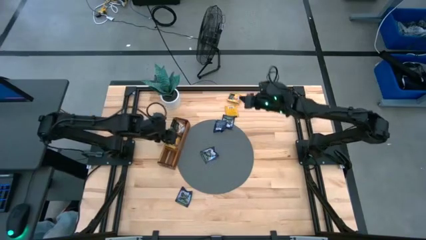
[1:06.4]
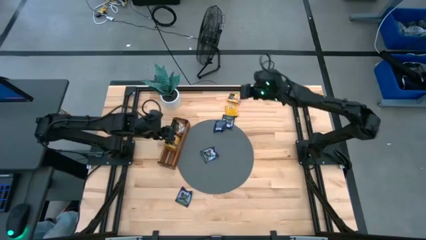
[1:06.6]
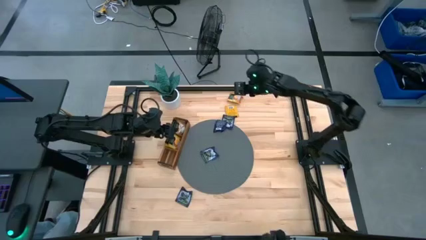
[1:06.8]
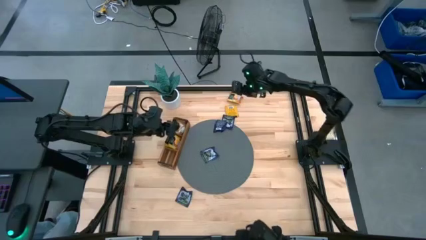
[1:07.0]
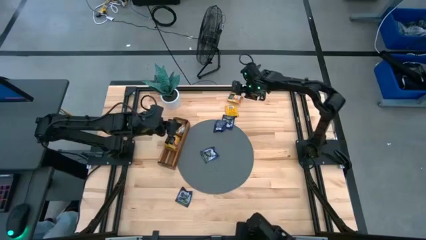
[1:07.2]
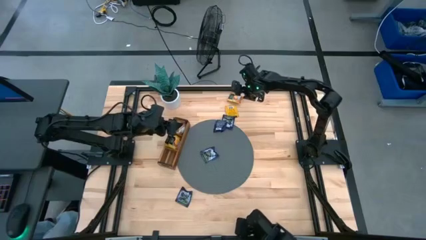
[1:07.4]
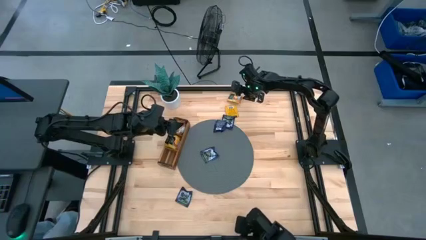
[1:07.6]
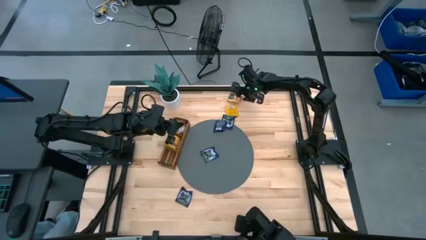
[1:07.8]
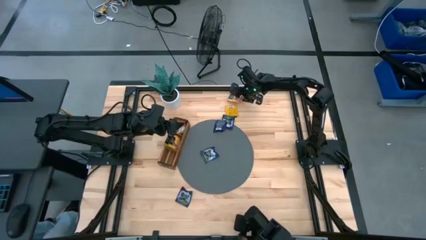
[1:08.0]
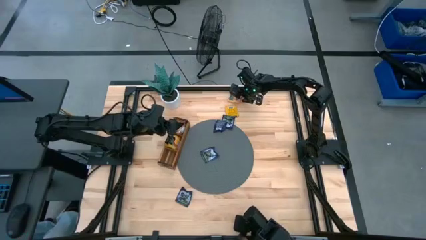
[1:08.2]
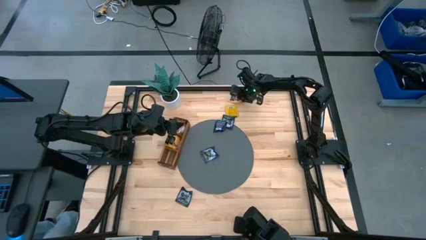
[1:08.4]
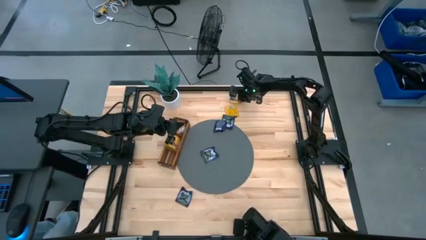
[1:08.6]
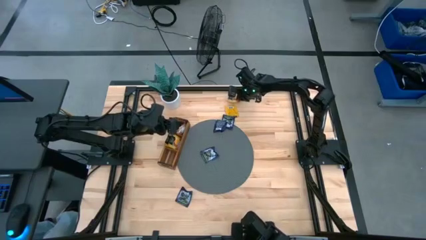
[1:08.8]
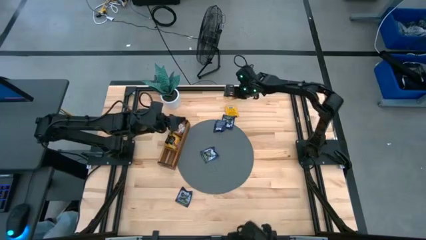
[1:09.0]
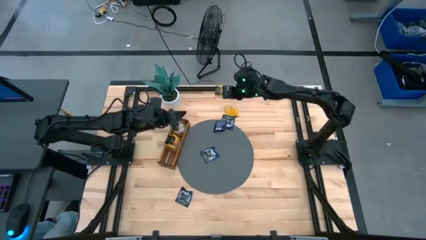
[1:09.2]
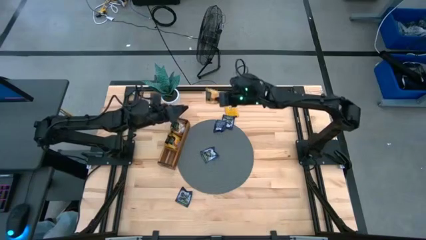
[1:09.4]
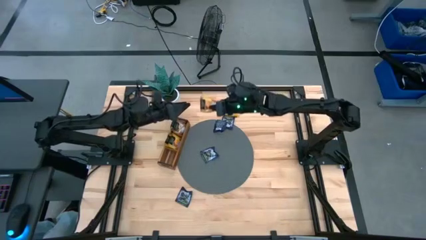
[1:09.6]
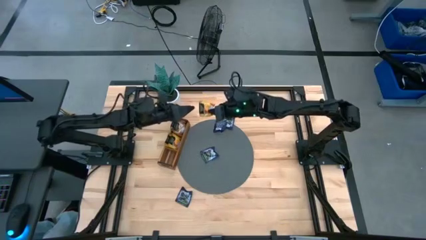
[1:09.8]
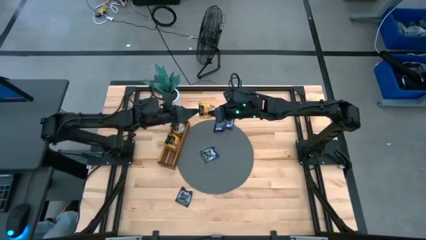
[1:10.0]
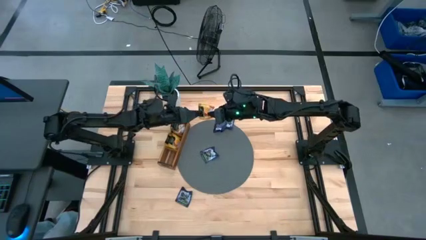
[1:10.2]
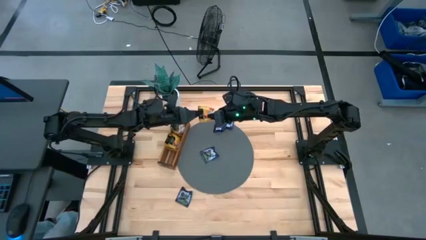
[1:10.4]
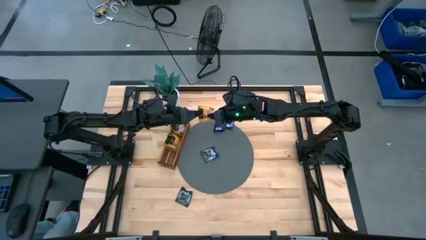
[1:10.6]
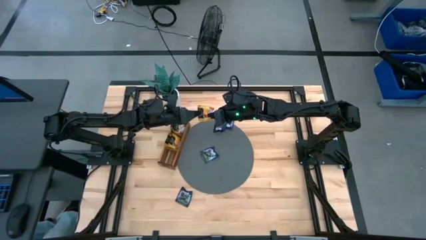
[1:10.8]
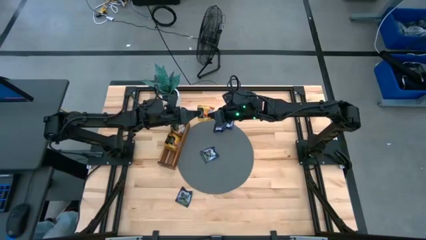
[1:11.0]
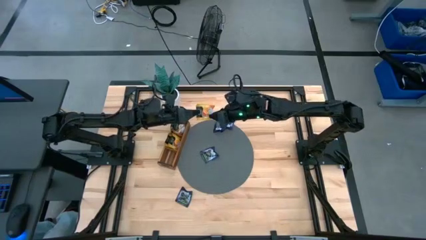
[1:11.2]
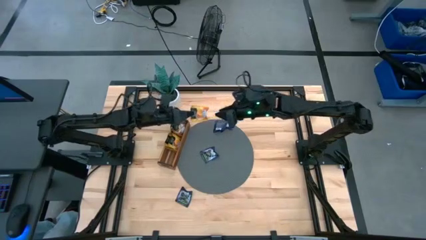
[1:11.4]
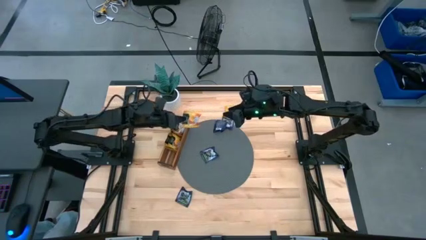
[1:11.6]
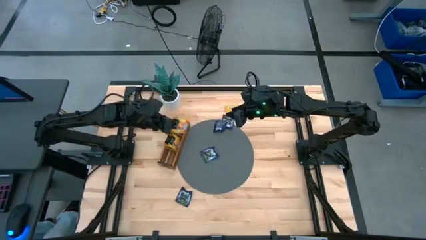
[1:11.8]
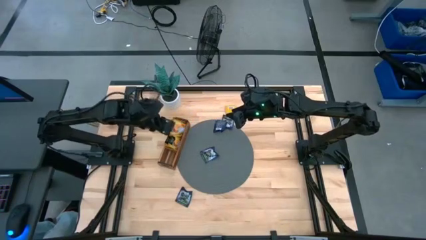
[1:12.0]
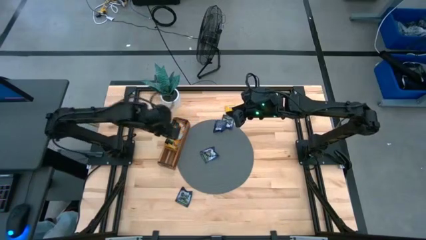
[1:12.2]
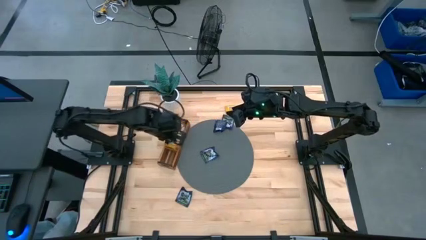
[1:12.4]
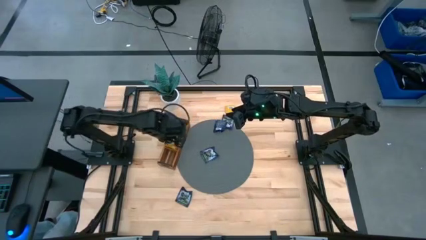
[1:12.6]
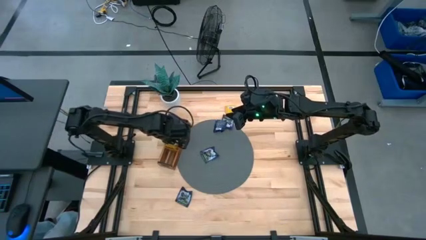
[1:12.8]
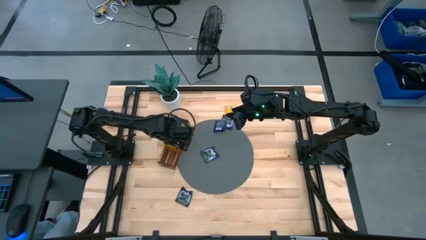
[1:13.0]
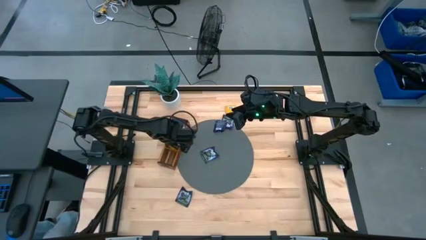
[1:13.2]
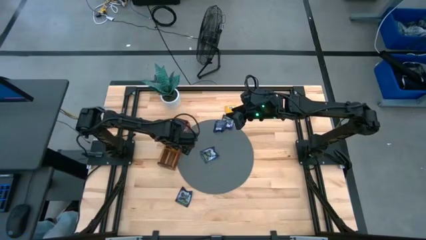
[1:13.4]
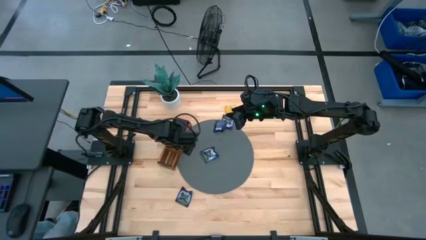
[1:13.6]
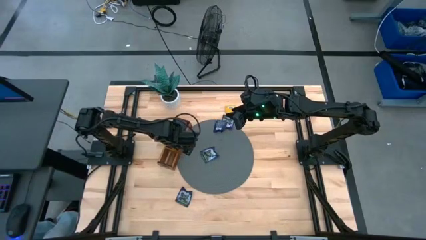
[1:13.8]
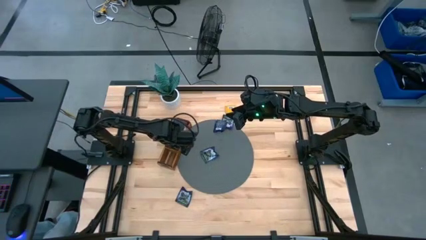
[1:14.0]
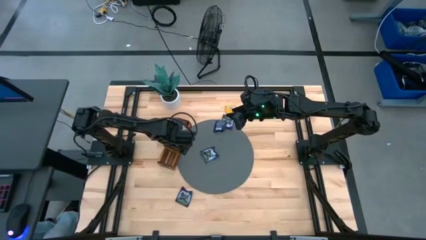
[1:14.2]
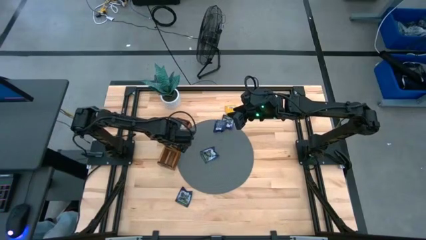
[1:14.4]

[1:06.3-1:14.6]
Task: Pick & Place Tea
Put the yellow tea bag into the middle section of the wooden organizer

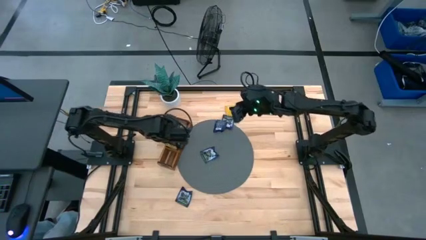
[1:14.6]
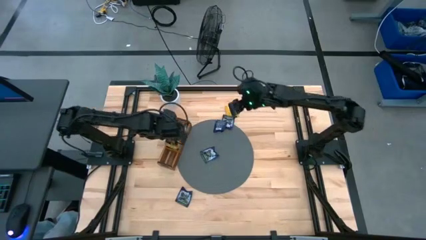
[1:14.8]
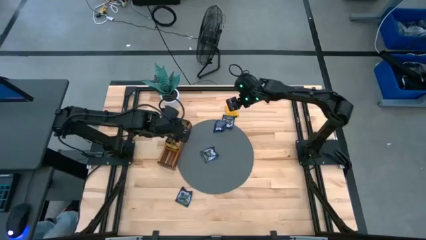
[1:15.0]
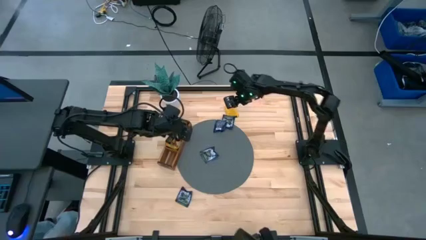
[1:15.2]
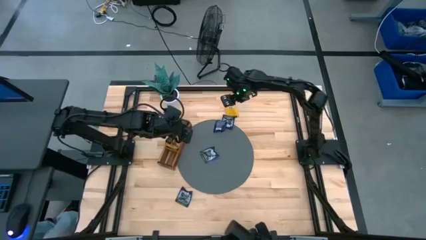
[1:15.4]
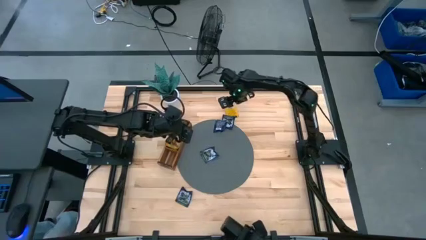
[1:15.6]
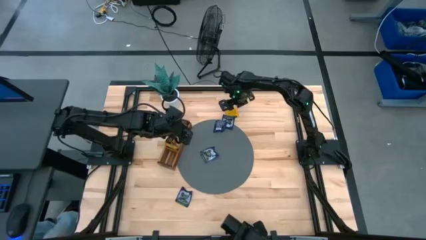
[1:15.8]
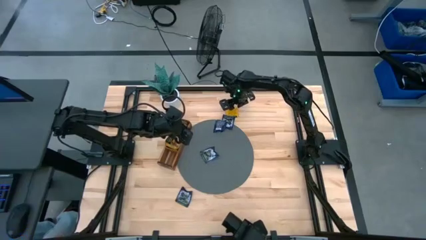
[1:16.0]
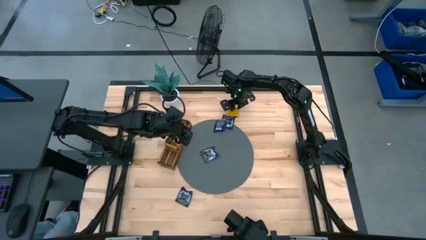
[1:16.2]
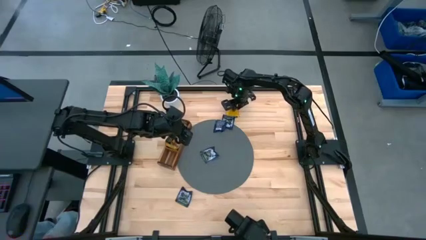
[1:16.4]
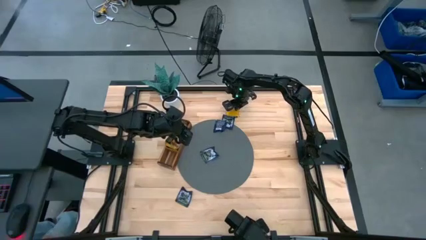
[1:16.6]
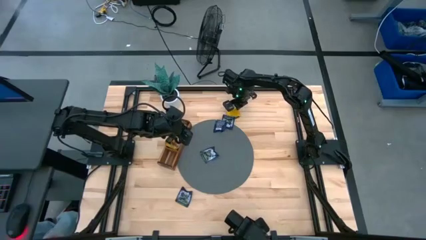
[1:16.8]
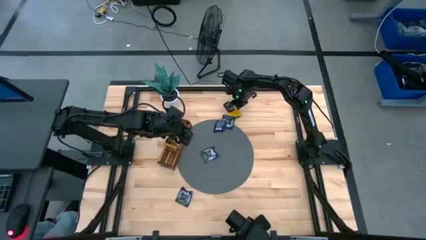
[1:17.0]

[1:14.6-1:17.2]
Put the yellow tea bag into the middle section of the wooden organizer

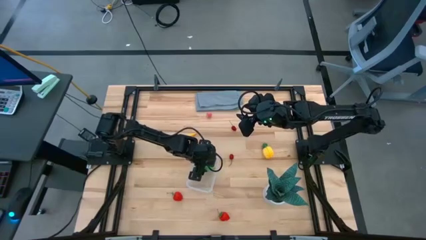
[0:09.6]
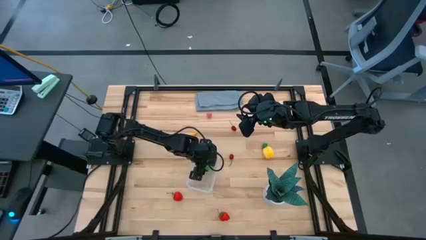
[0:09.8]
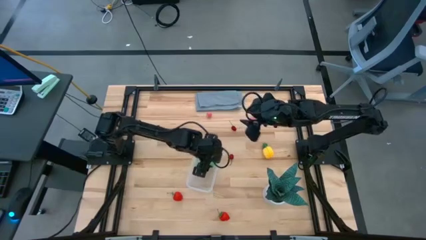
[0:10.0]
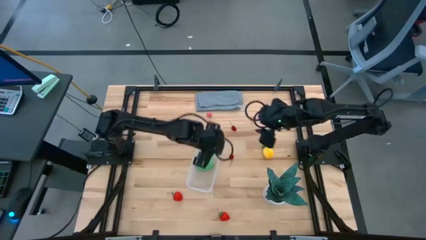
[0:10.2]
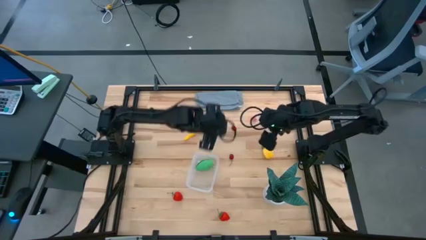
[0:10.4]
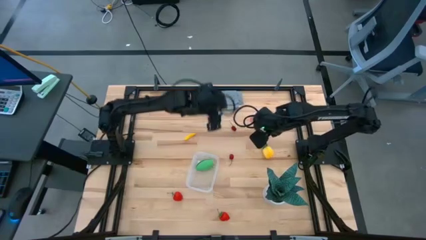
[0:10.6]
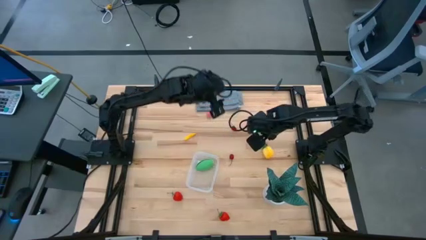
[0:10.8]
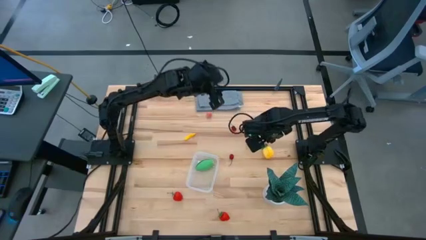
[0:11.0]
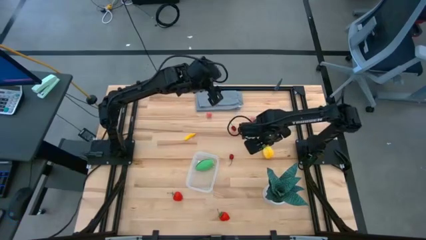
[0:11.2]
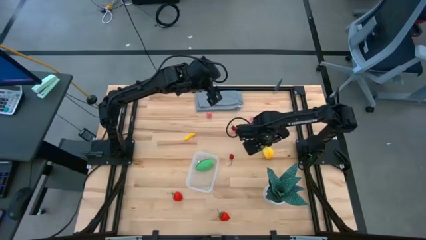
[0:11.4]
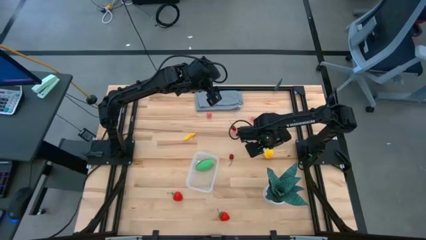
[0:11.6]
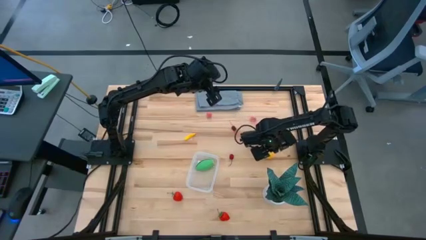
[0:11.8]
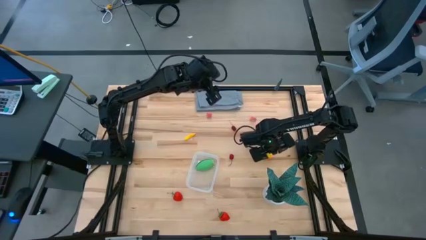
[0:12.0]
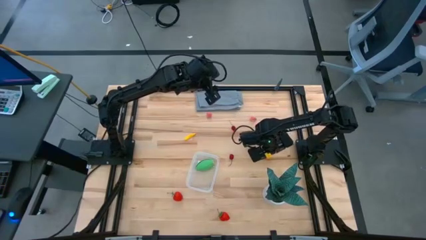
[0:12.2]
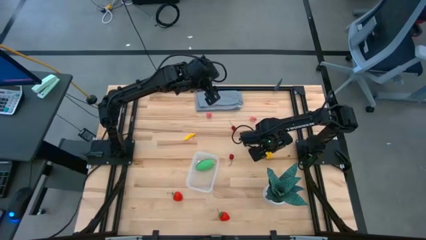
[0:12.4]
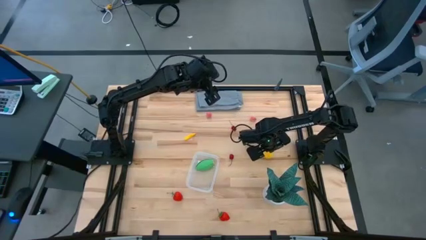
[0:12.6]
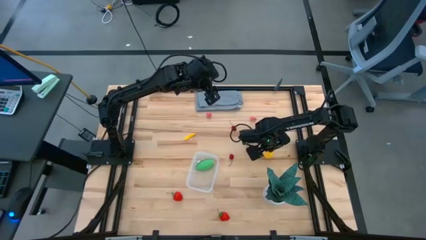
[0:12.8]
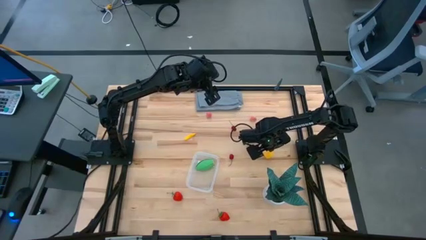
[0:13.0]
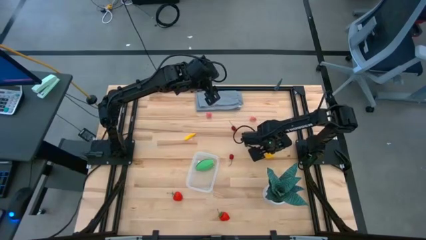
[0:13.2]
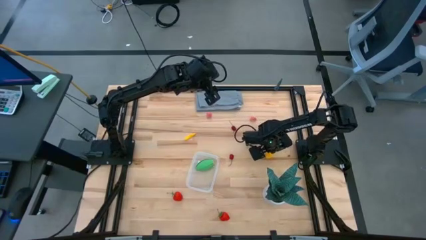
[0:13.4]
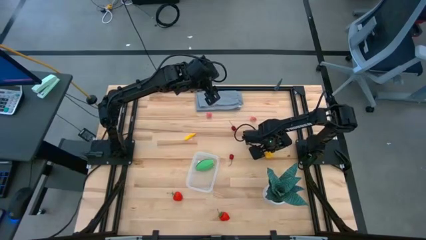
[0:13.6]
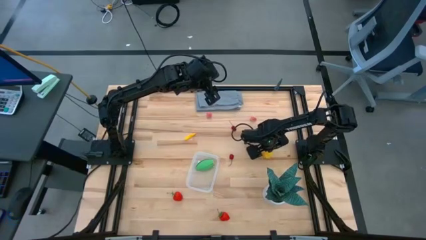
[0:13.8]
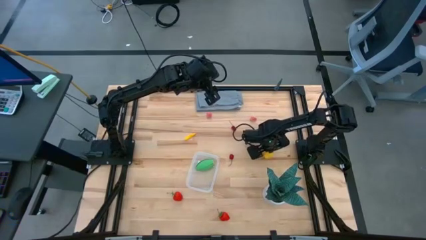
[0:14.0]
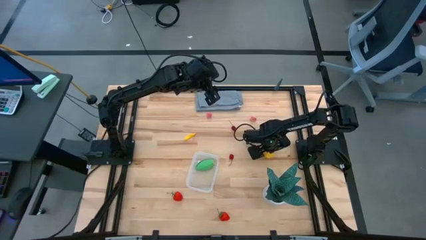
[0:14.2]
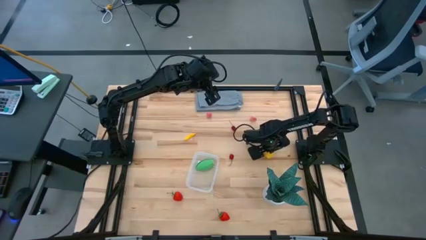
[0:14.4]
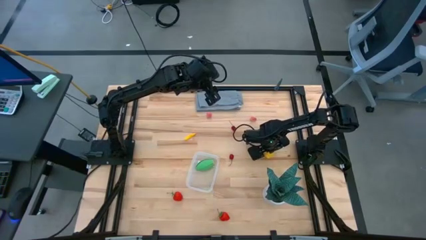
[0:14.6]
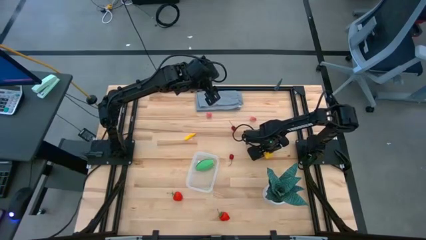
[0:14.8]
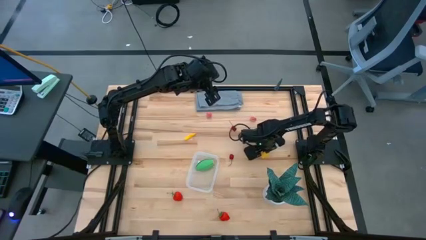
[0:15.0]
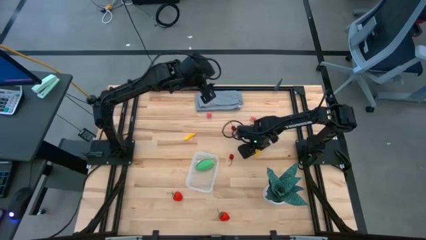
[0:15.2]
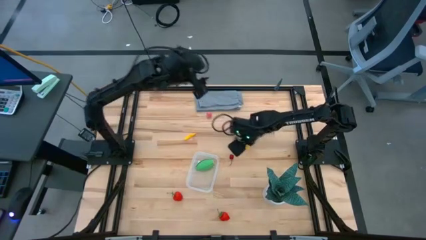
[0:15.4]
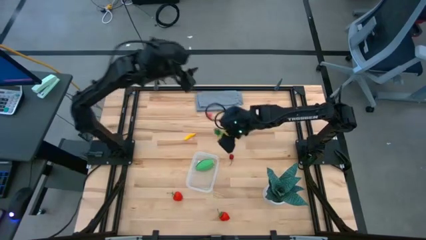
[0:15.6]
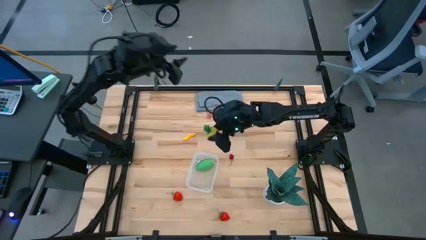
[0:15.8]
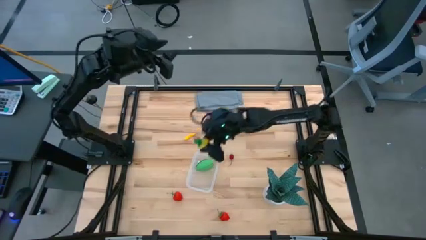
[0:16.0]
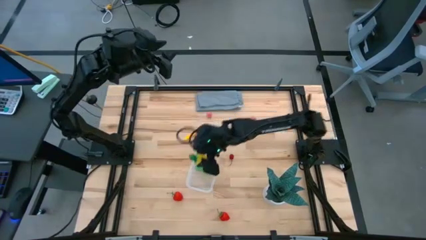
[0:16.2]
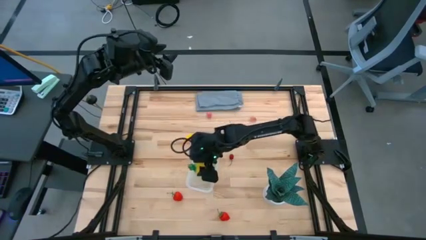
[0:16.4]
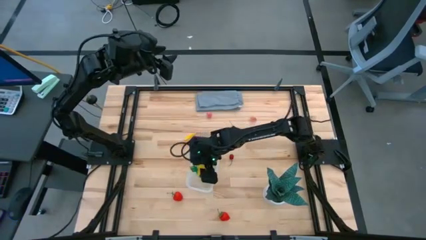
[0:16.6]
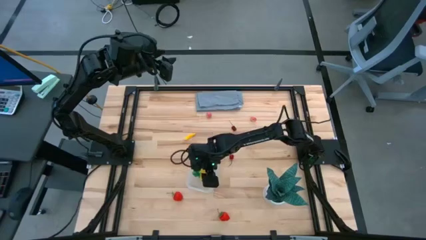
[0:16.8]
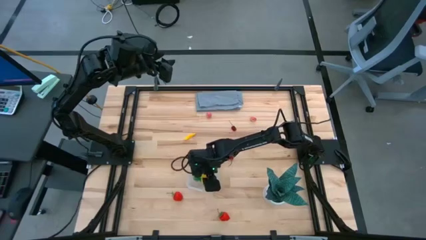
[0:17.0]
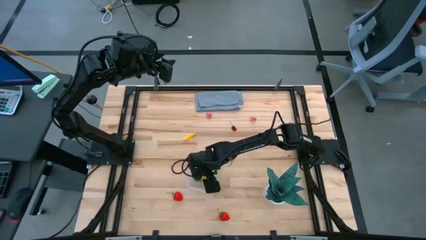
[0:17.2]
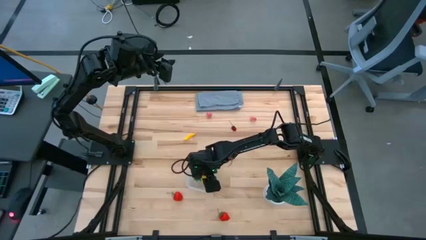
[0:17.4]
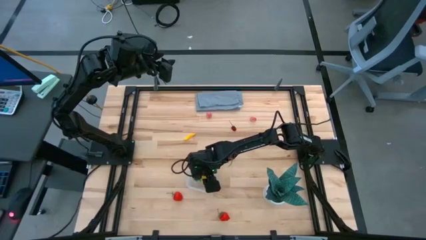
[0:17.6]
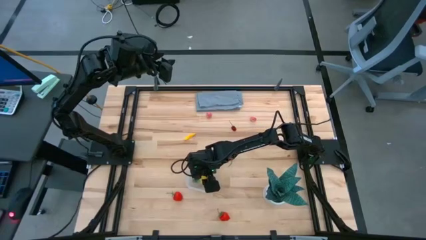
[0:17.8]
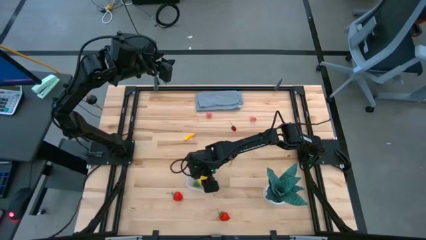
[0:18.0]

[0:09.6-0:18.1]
Task: Pick and placing Produce into tupperware
Put the pineapple into the transparent bin
